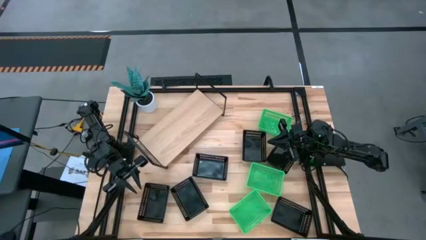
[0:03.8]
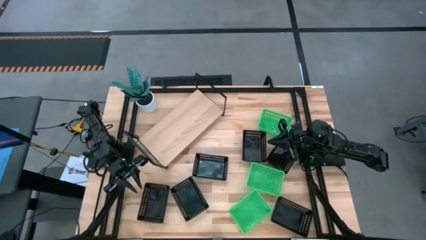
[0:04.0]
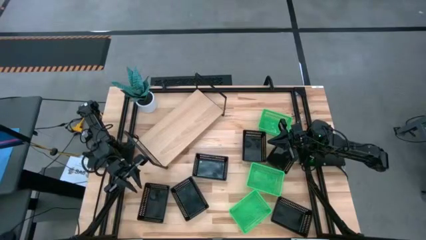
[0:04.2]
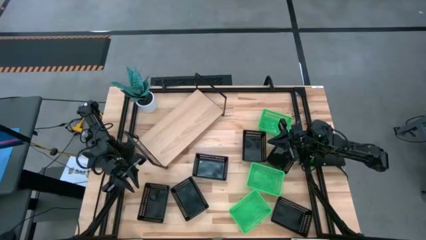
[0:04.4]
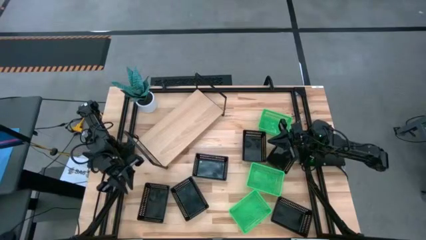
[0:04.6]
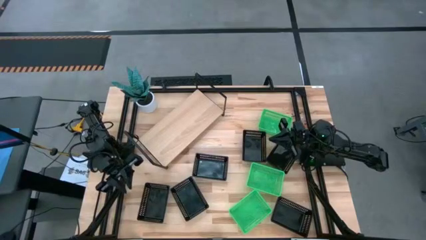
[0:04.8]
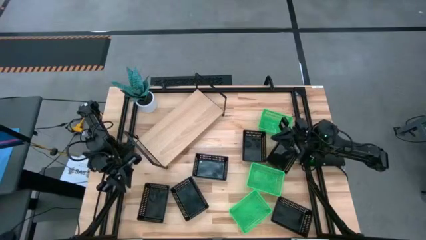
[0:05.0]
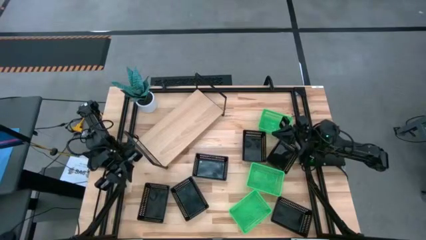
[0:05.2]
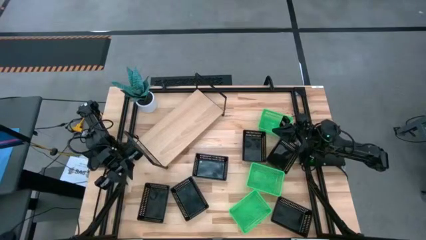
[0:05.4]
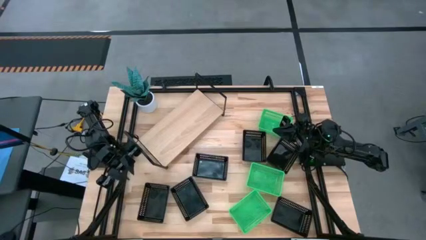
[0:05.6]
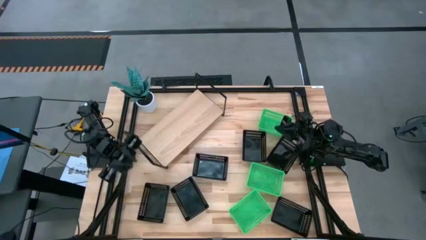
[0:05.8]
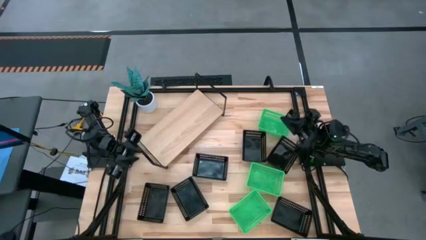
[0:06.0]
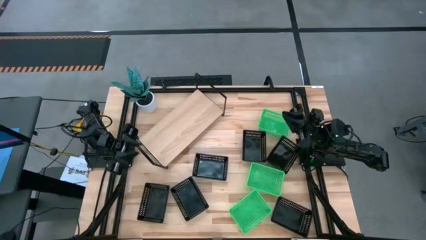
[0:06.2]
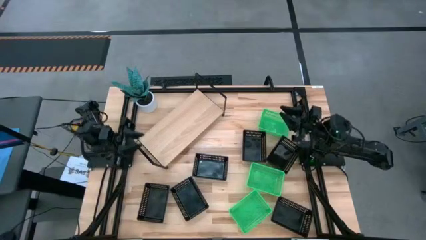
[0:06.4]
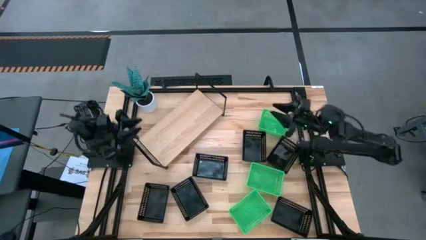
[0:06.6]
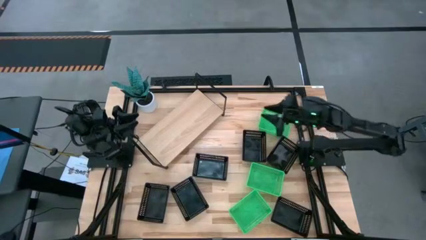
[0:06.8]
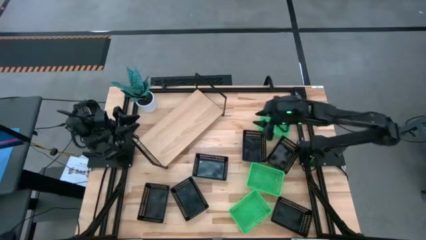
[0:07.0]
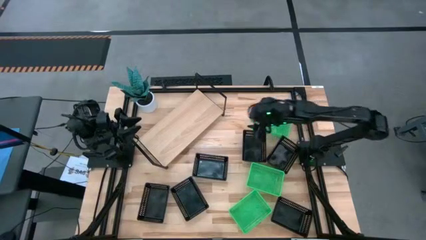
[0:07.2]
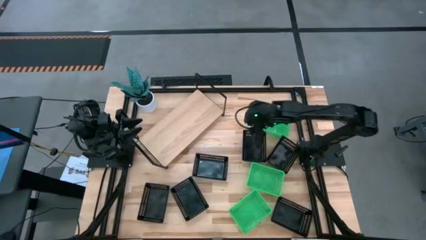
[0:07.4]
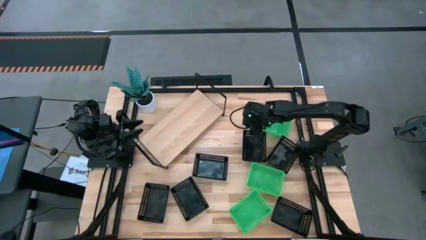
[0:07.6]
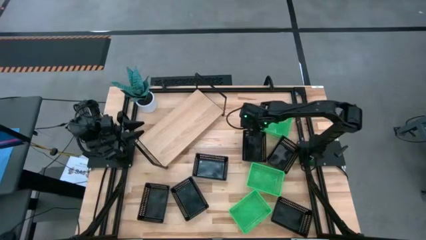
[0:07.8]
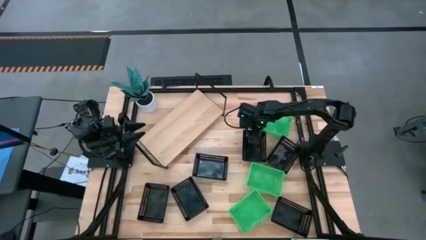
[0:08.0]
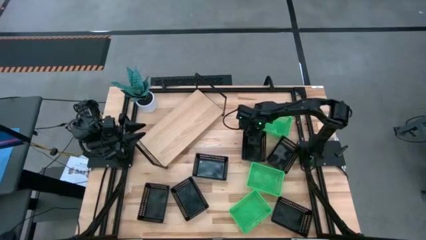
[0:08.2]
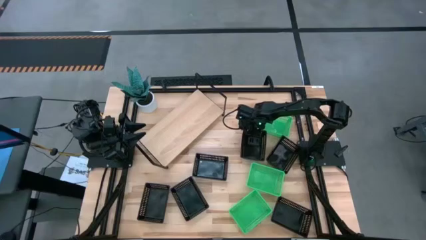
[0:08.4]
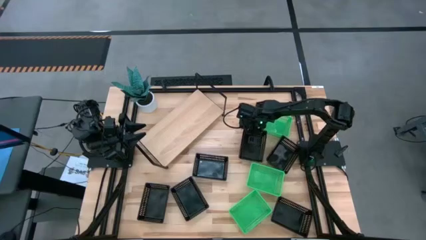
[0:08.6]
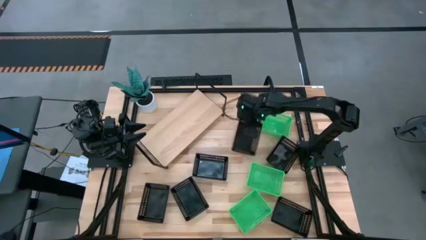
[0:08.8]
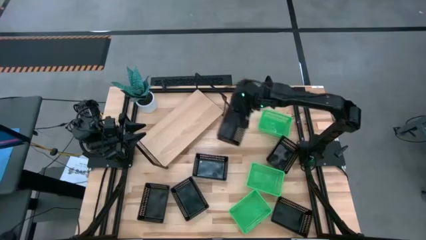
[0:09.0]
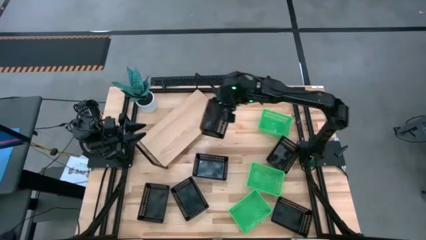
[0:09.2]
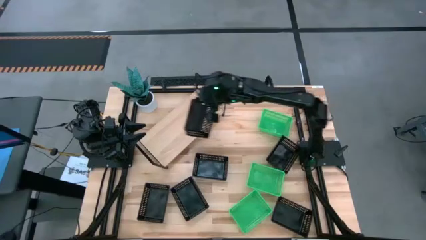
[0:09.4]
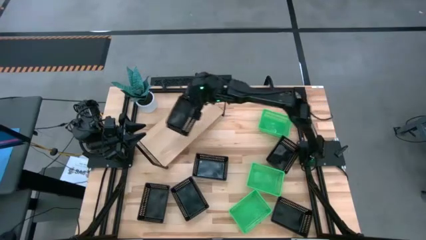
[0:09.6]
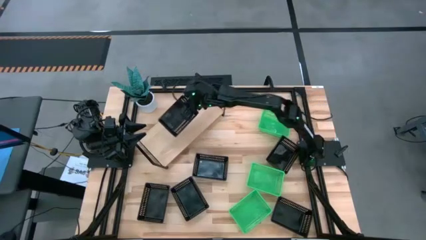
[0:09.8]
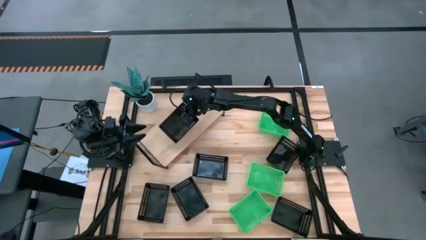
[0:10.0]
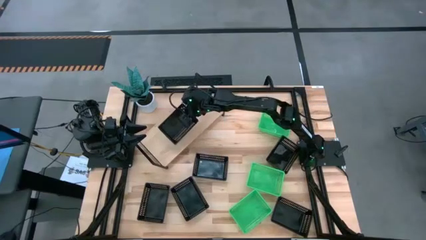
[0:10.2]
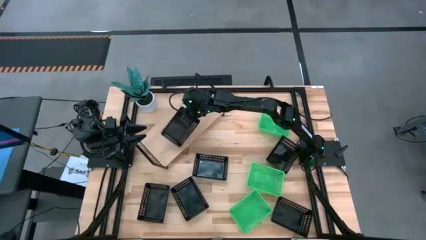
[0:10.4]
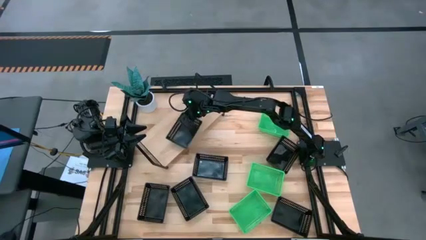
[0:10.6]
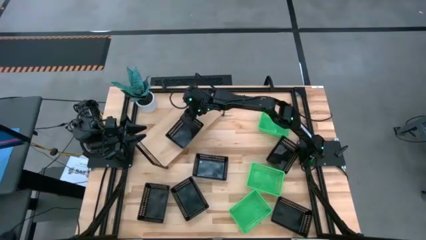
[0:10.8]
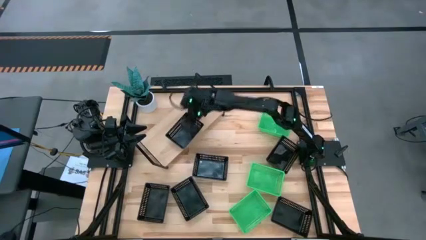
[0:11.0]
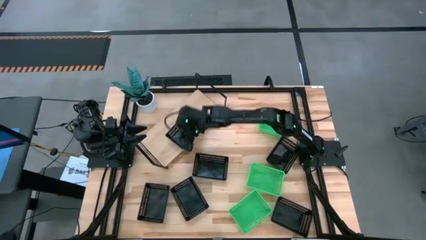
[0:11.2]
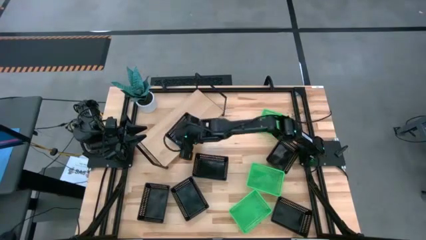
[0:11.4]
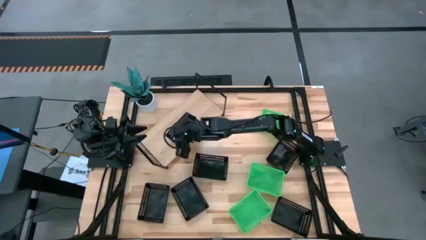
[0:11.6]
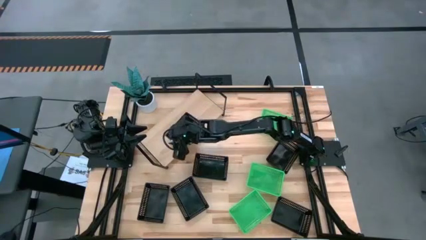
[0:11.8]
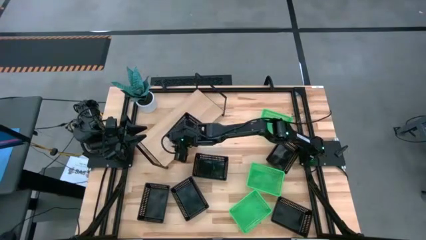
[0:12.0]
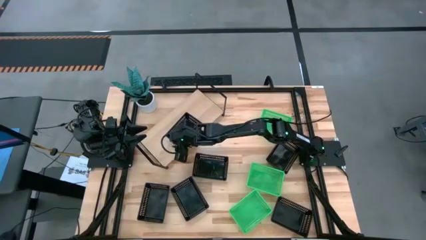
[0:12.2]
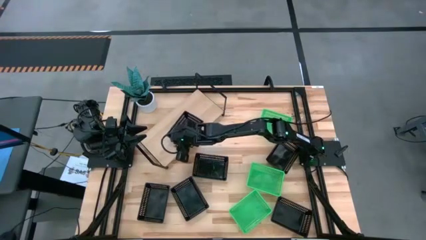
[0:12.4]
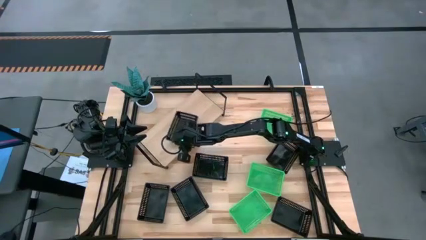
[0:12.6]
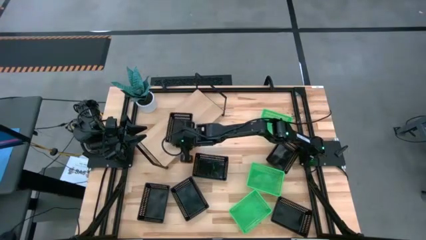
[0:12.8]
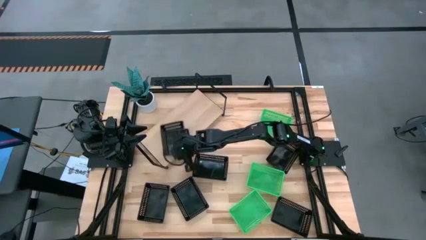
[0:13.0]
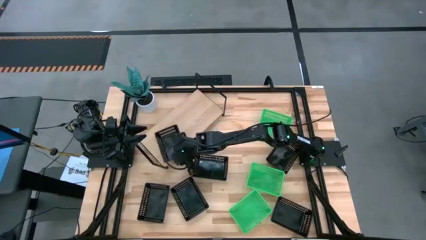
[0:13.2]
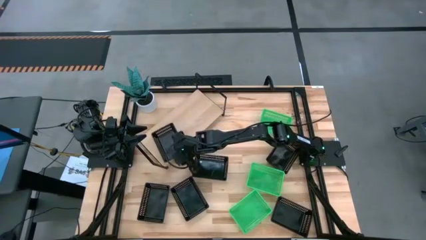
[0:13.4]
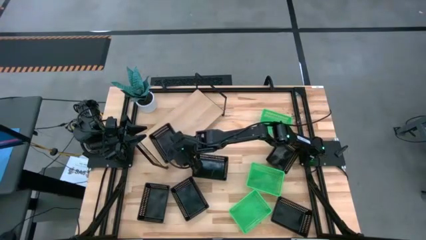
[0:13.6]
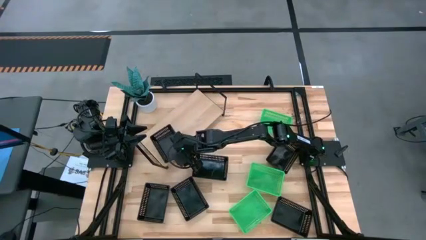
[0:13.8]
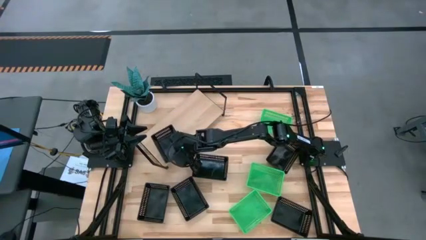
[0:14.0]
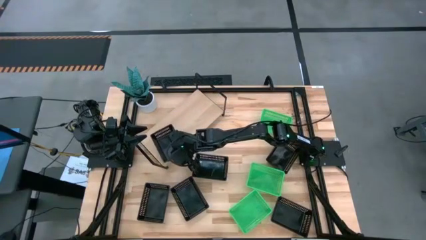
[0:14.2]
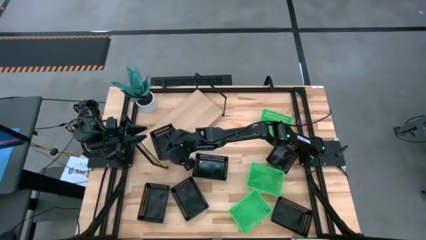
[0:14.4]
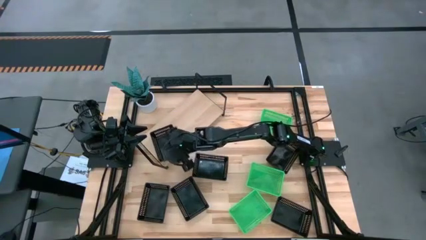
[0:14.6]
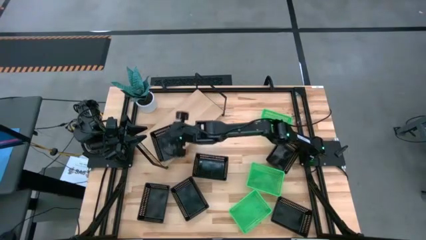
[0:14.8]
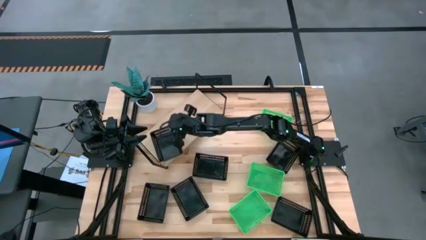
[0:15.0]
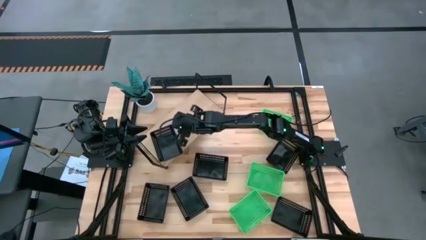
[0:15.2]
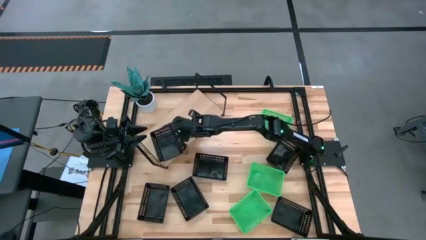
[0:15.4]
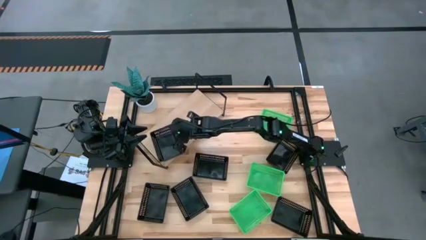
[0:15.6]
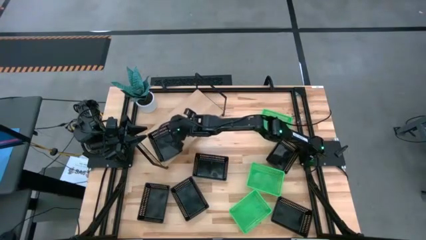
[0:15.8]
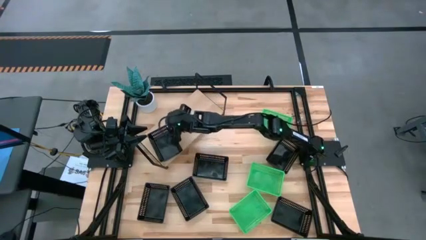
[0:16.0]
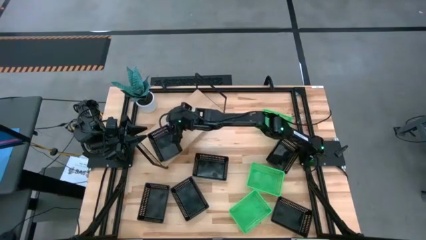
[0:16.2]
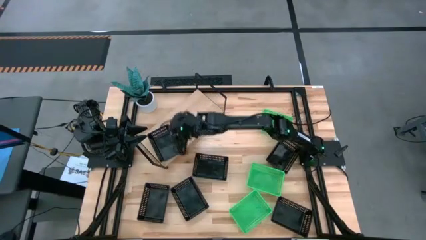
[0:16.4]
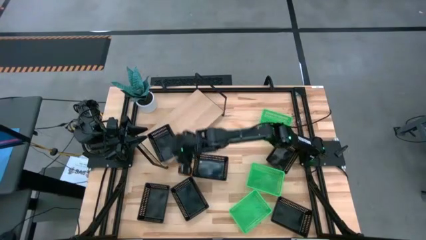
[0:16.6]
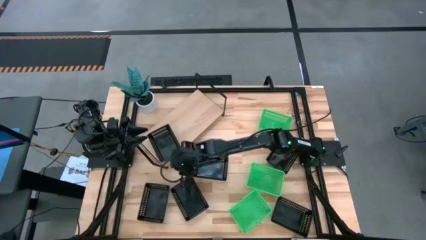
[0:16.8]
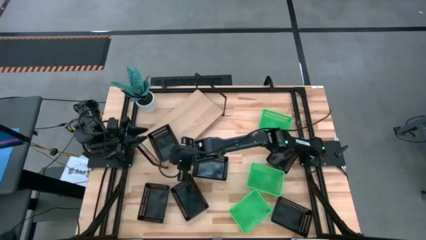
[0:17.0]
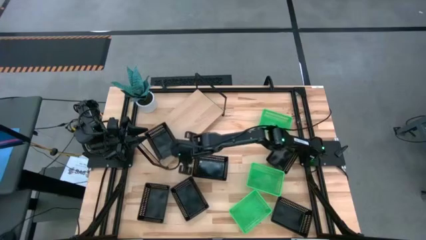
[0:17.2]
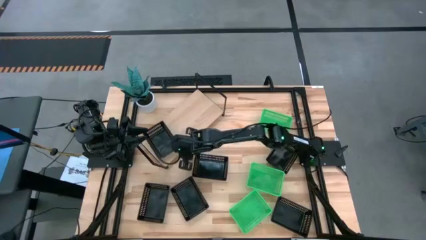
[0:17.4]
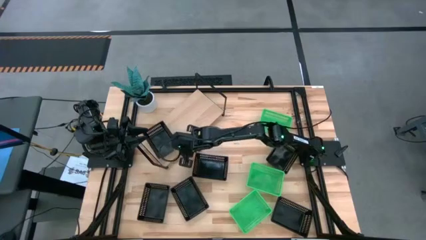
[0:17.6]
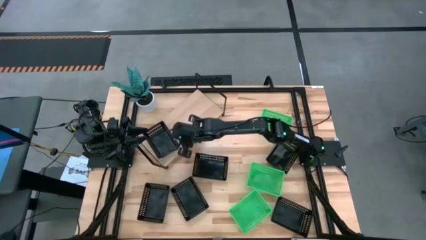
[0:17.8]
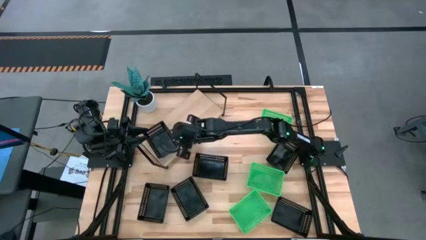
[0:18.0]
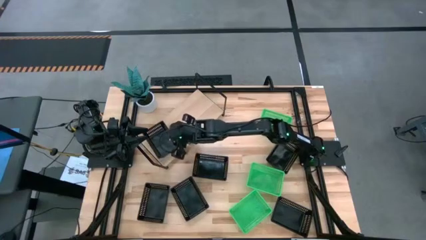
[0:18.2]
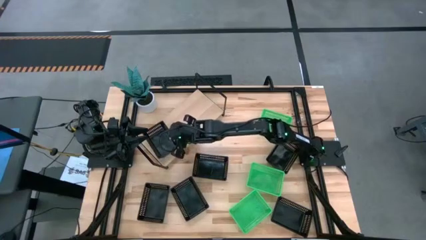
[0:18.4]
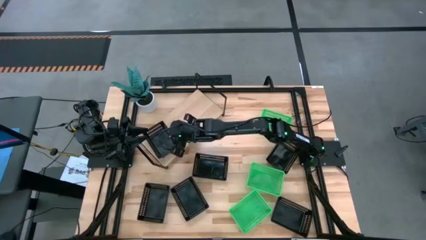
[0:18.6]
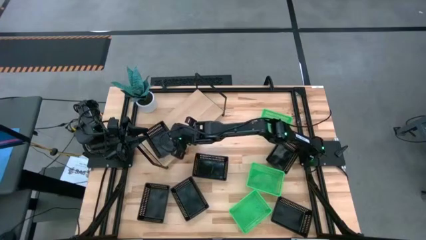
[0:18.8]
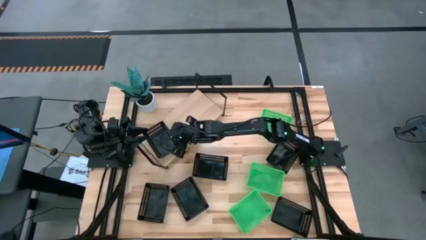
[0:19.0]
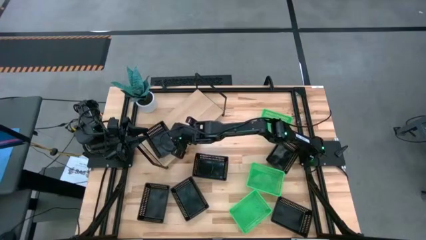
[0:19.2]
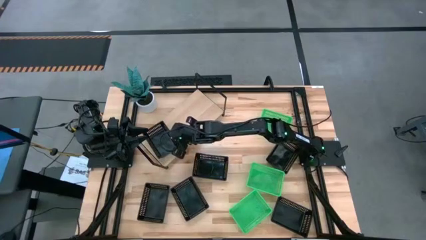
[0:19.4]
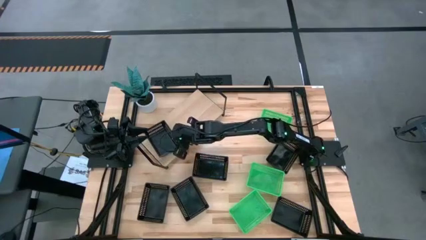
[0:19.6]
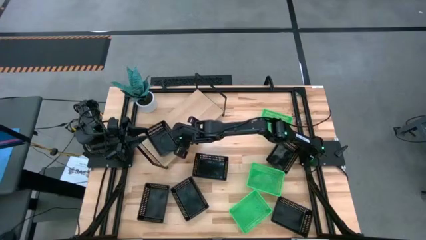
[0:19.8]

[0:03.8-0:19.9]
Task: Stack baskets on shelf by color
Put the black bin on the shelf
